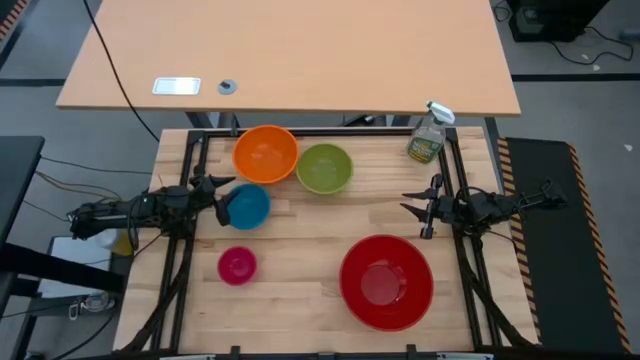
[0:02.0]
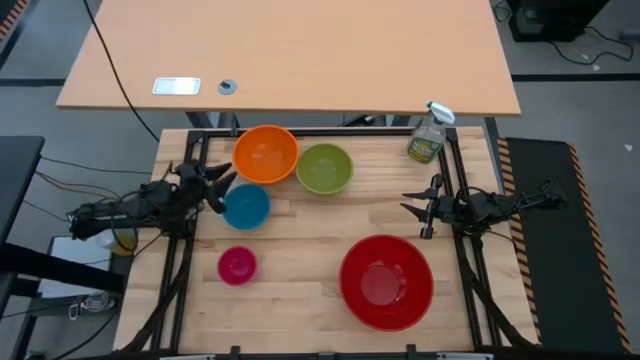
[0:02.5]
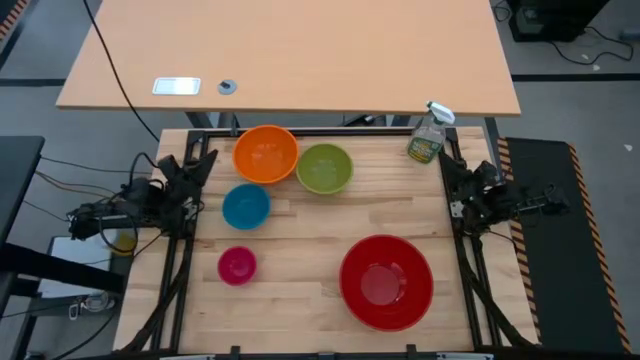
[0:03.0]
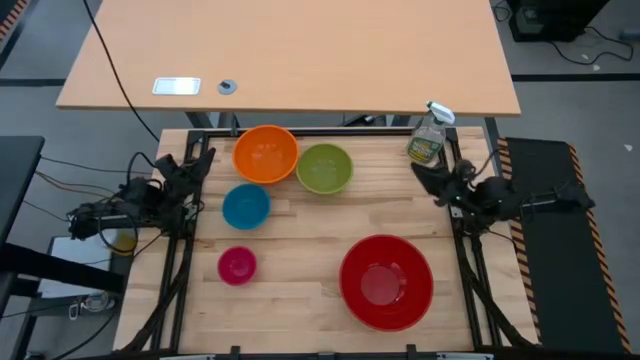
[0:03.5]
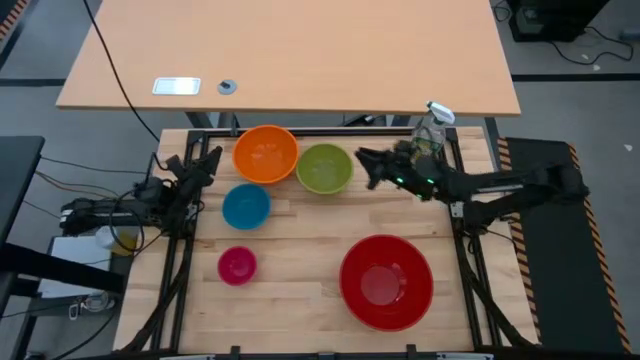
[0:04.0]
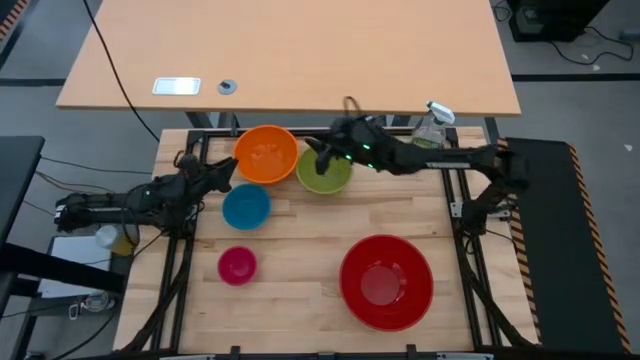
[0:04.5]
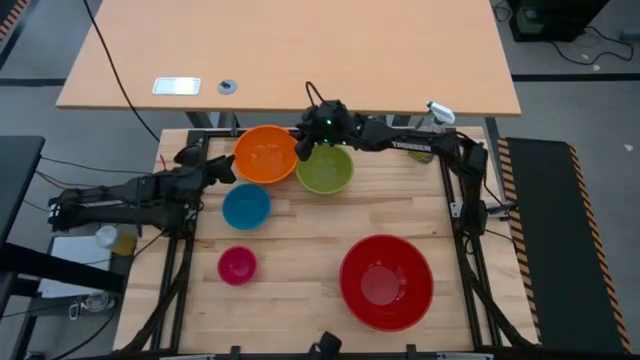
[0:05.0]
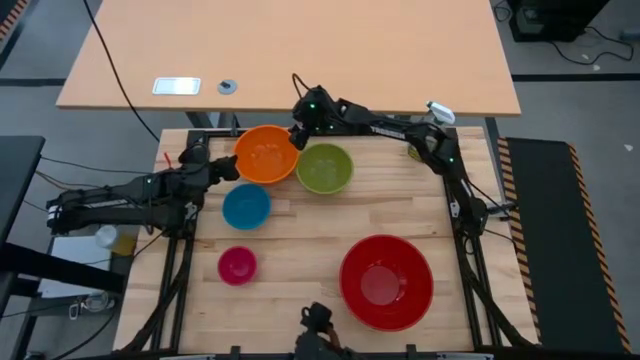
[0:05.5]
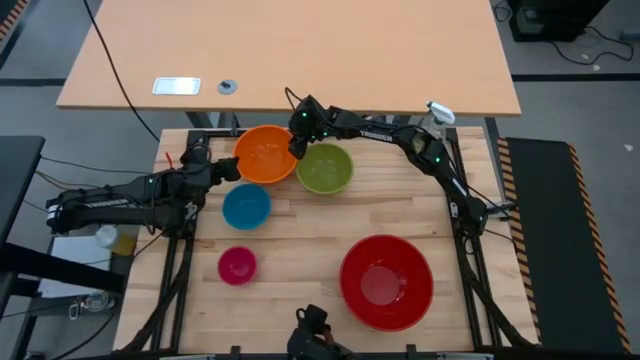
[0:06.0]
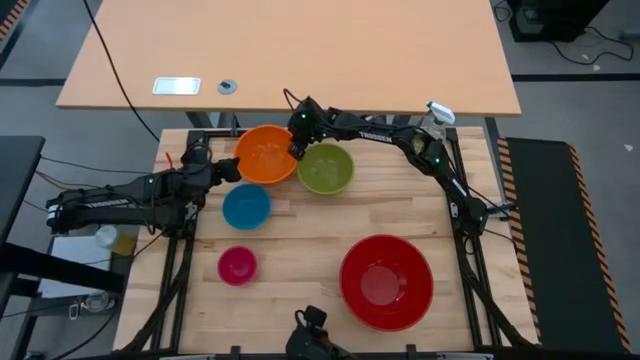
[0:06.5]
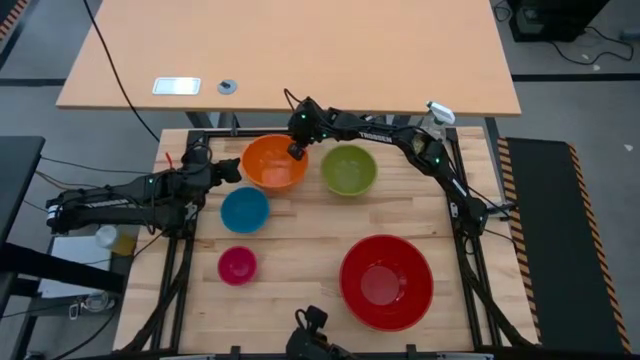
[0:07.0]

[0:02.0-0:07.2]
Stack the orange bowl on top of the red bowl

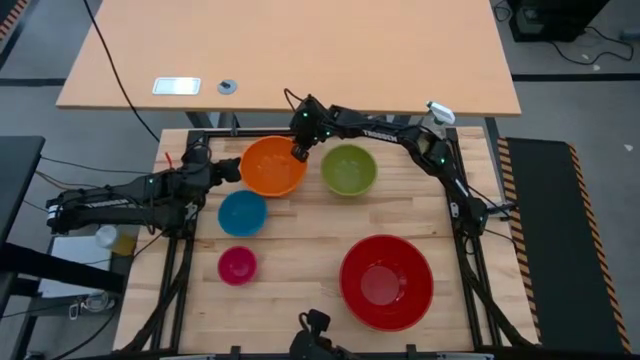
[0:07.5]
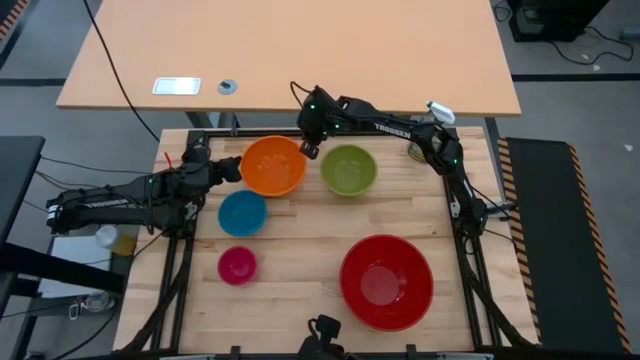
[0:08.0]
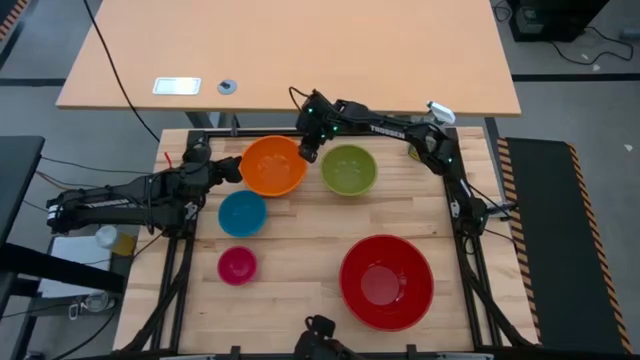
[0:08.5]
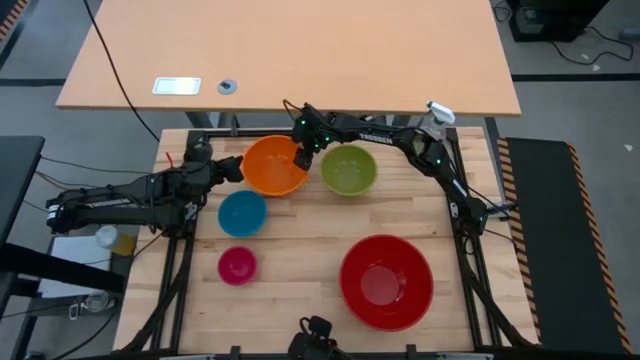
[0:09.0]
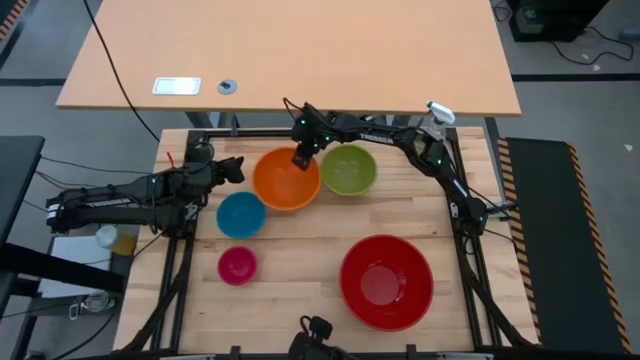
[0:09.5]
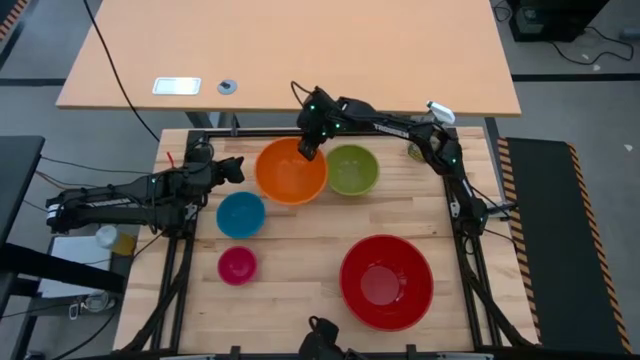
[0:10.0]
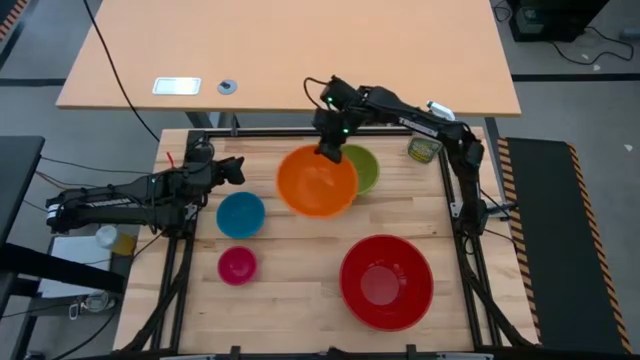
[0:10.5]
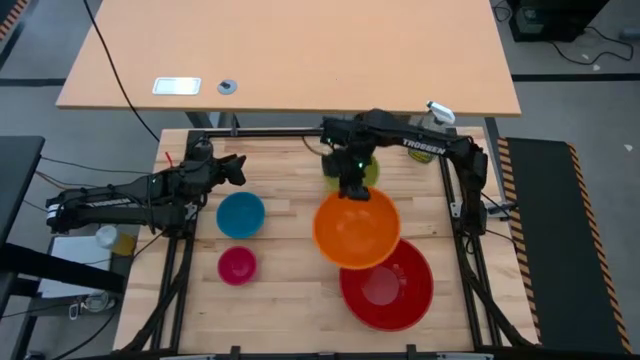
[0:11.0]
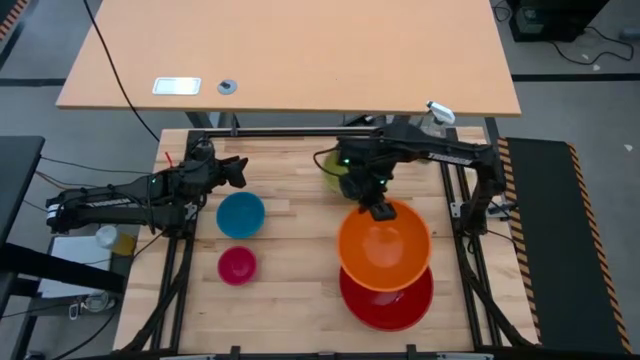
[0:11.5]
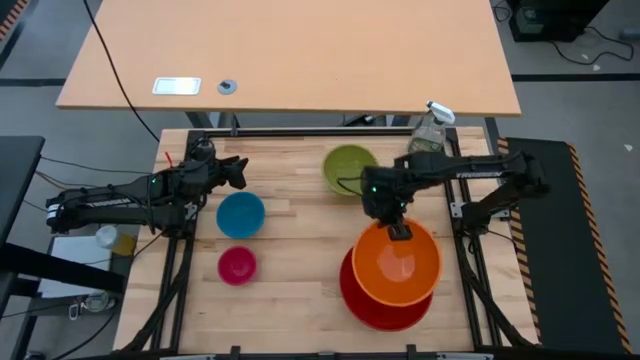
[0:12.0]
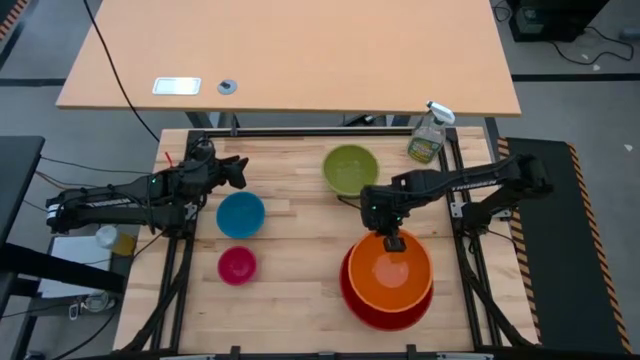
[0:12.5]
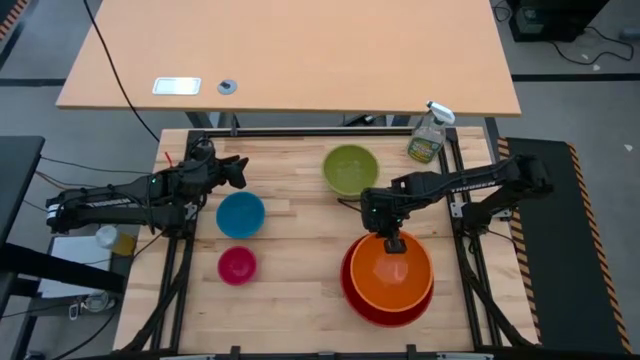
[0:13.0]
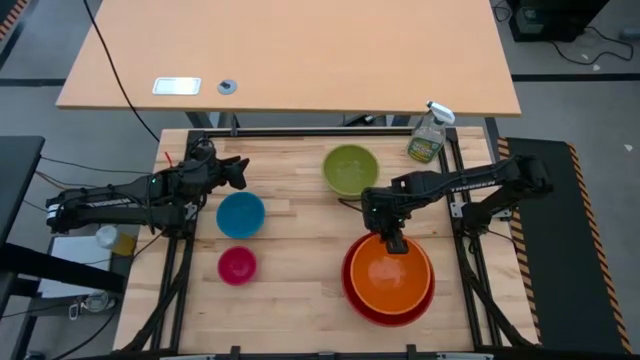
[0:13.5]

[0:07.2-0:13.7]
Stack the orange bowl on top of the red bowl

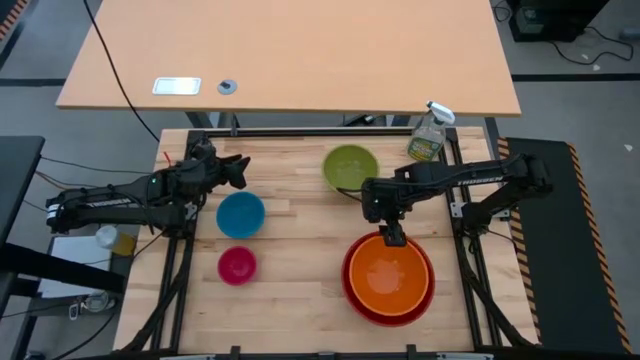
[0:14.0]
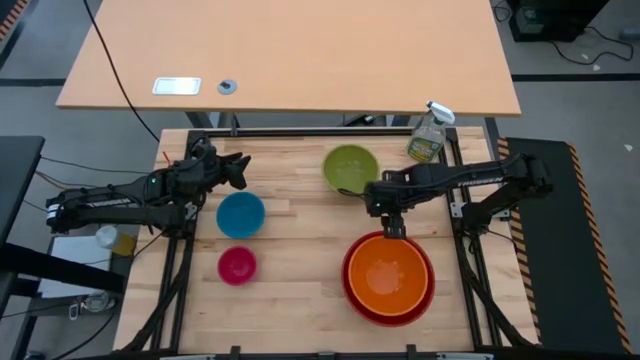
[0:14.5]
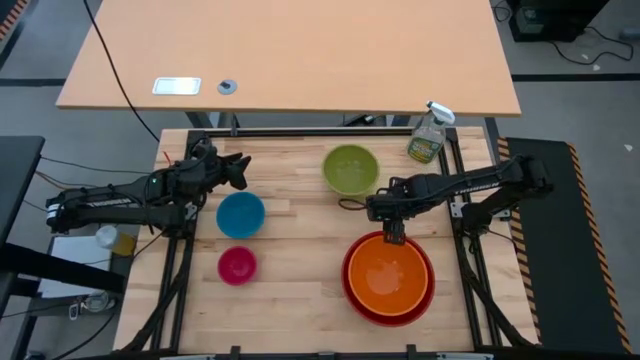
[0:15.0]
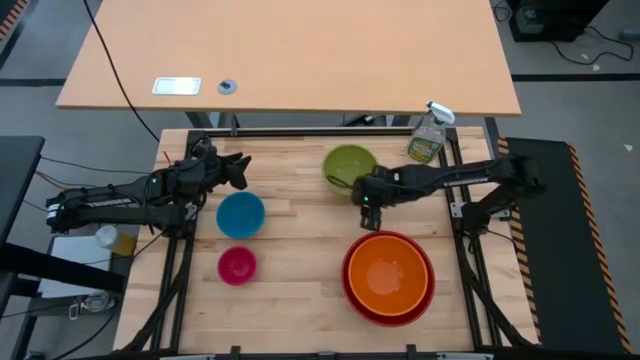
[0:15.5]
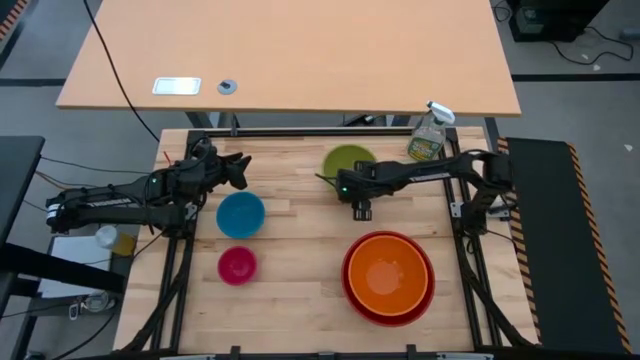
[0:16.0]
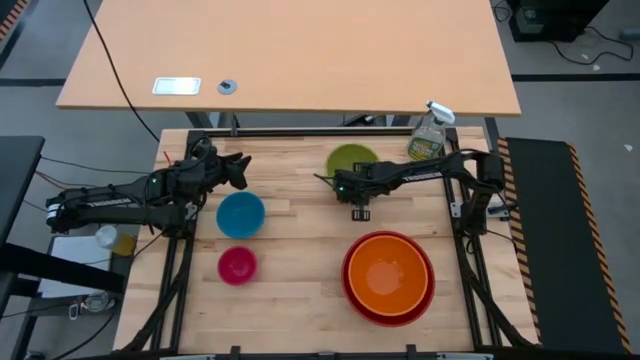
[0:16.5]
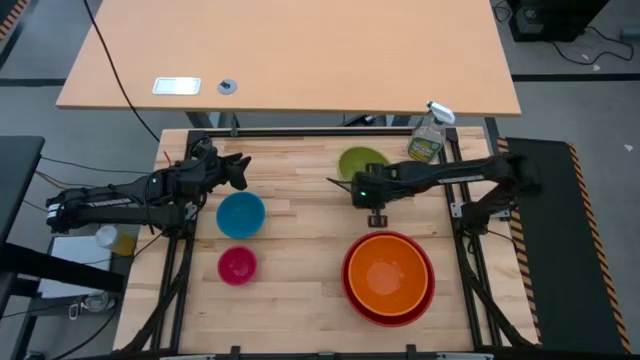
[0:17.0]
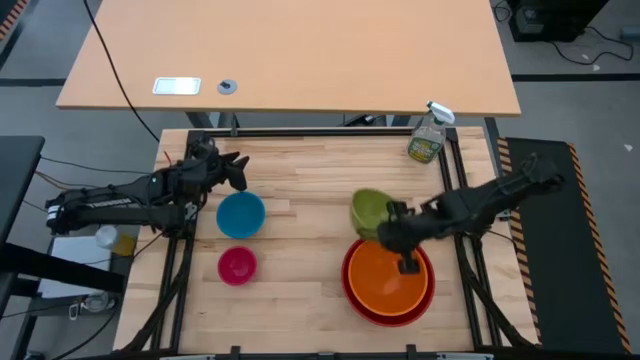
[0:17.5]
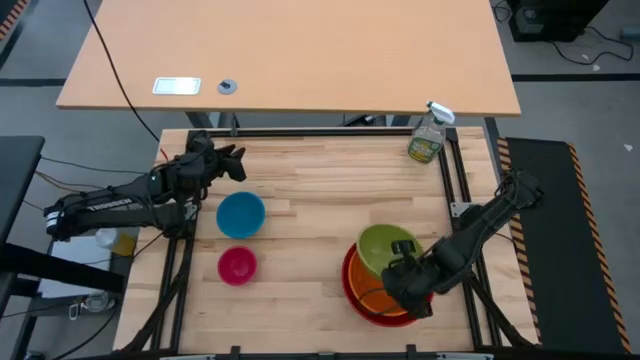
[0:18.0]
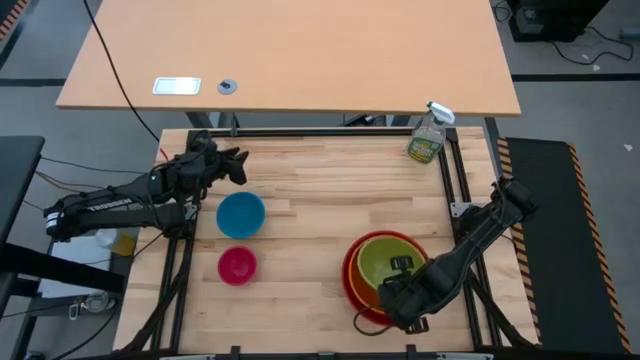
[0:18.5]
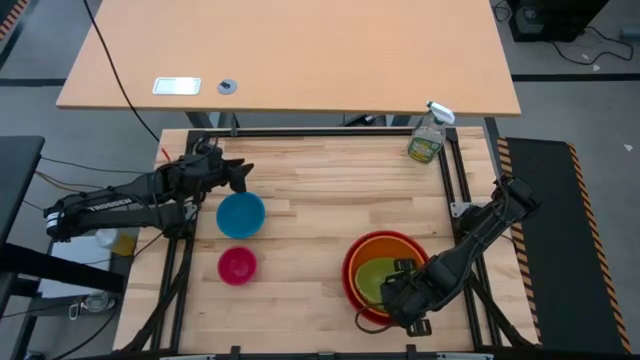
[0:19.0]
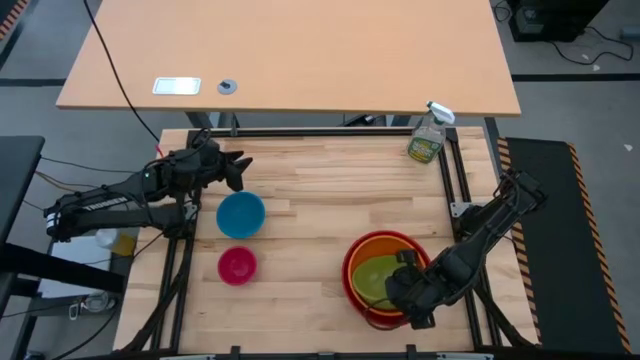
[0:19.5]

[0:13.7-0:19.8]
Stack the green bowl on top of the orange bowl
